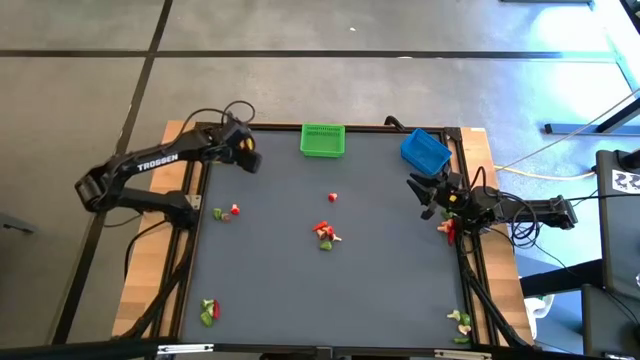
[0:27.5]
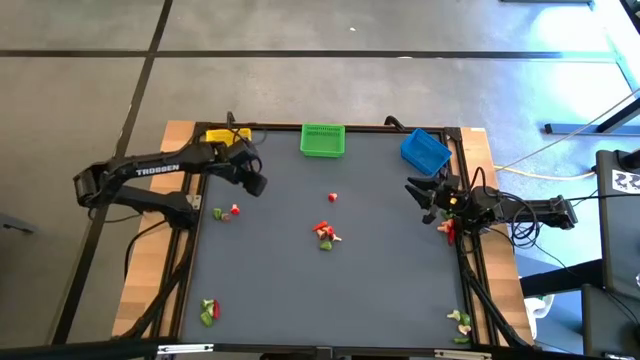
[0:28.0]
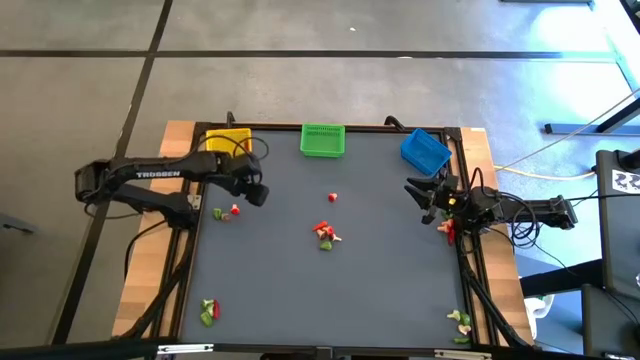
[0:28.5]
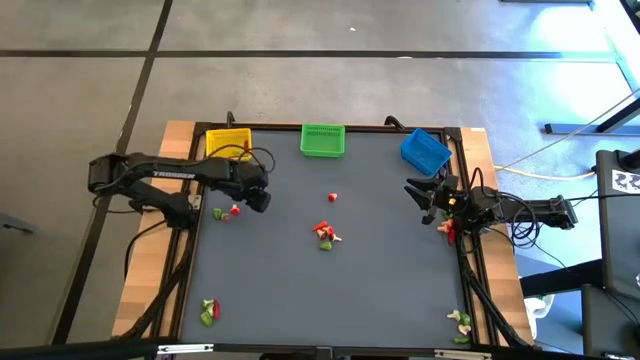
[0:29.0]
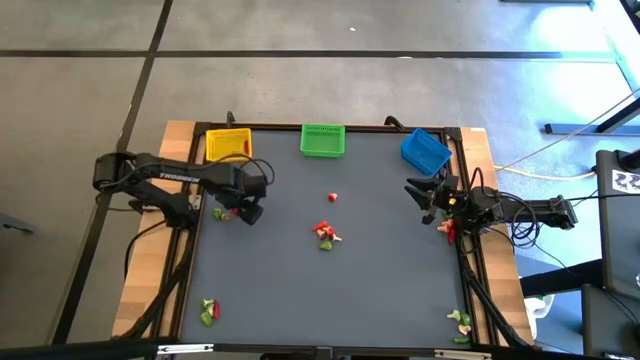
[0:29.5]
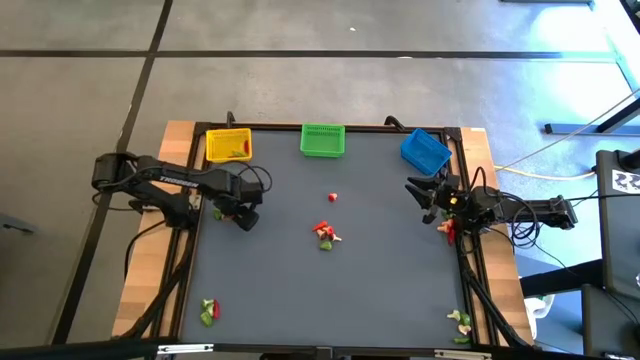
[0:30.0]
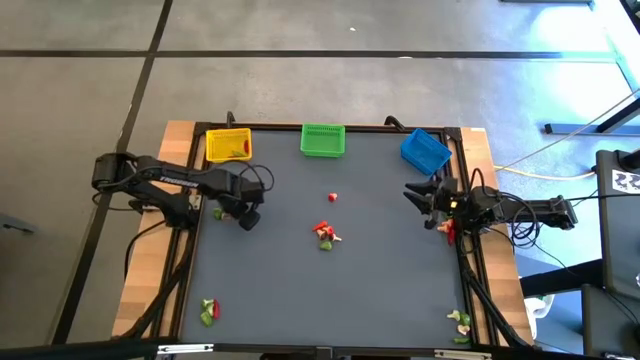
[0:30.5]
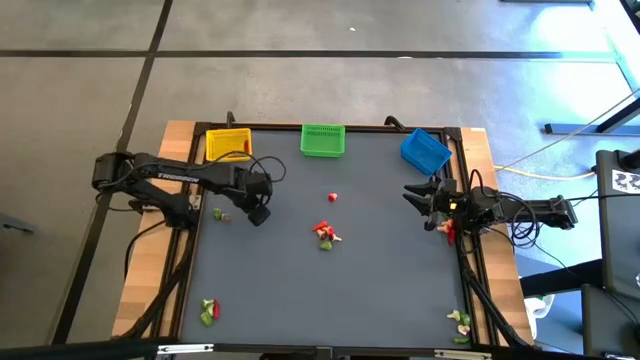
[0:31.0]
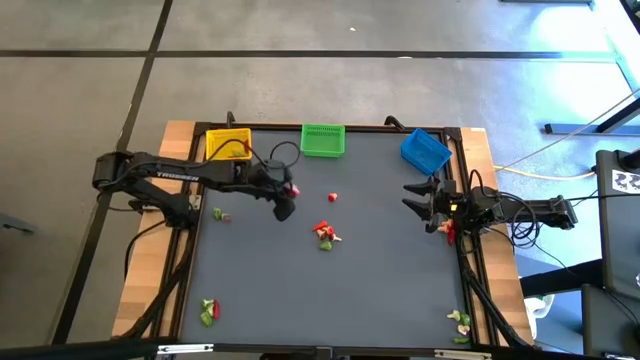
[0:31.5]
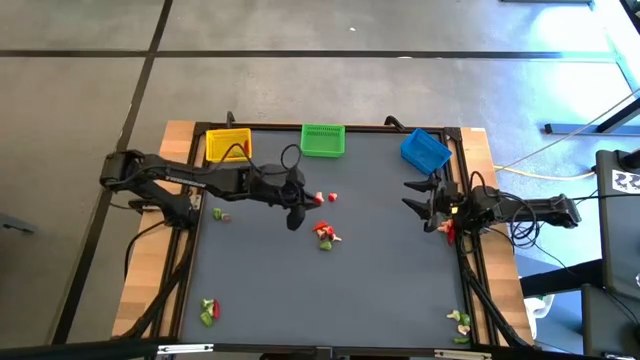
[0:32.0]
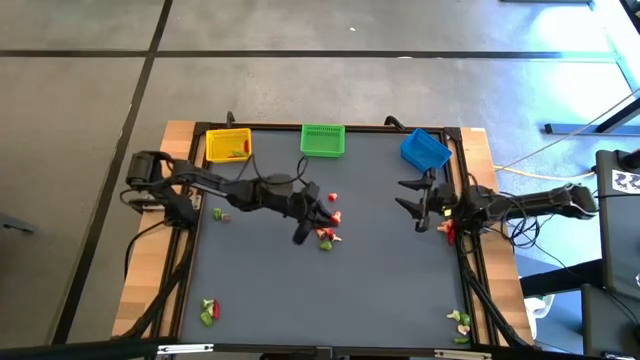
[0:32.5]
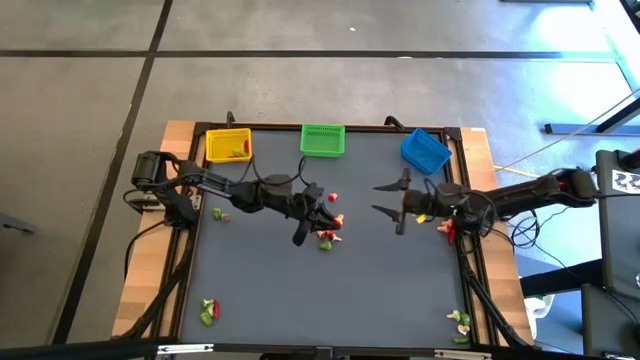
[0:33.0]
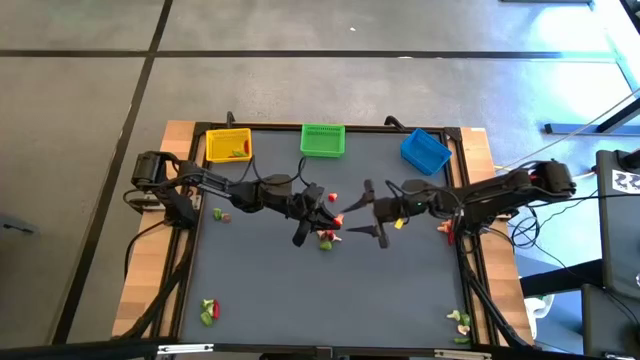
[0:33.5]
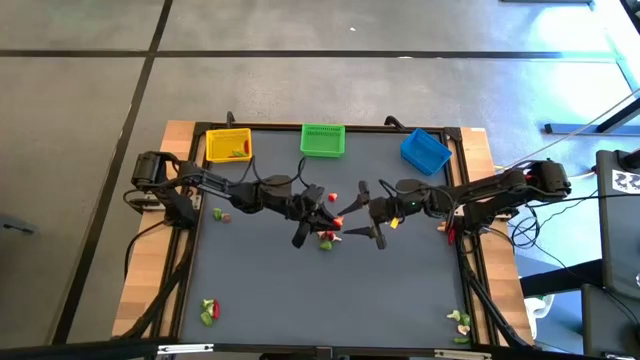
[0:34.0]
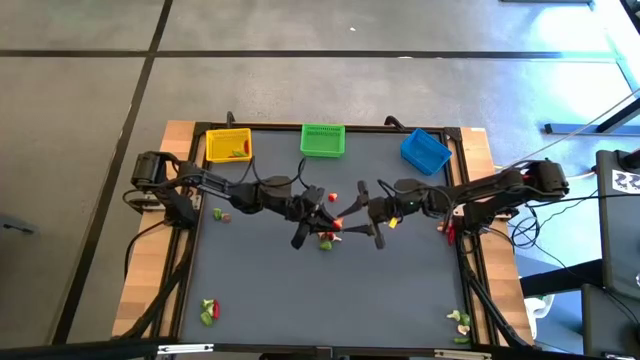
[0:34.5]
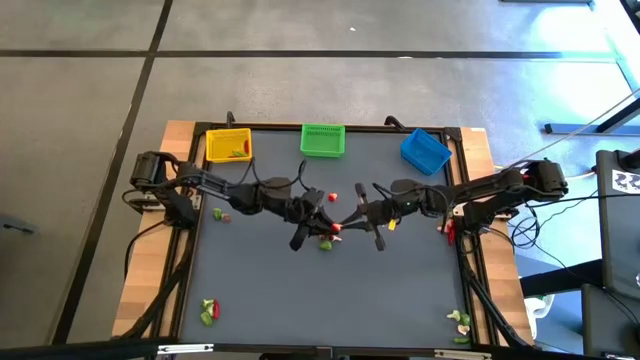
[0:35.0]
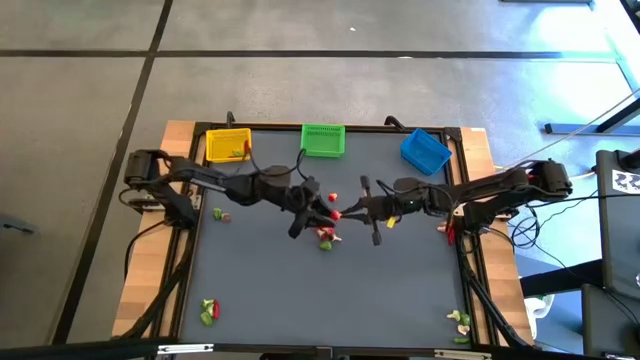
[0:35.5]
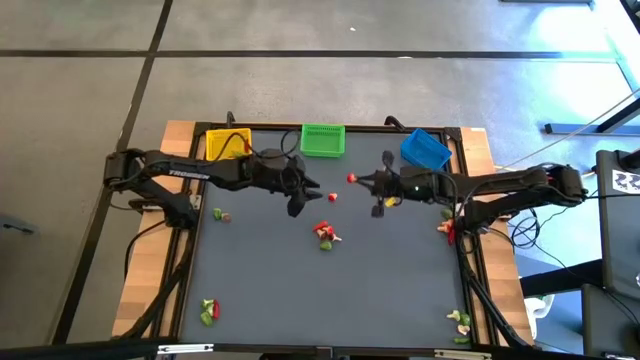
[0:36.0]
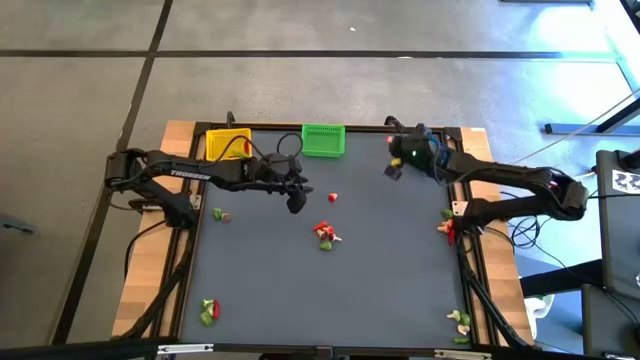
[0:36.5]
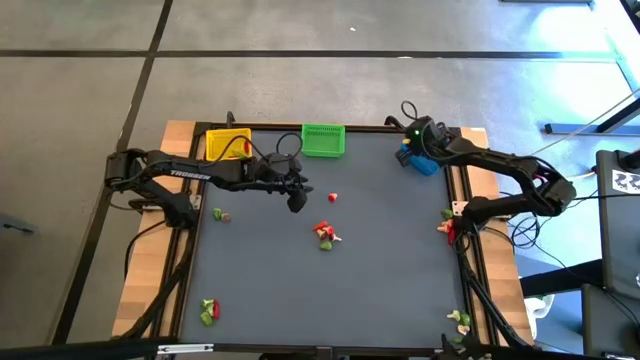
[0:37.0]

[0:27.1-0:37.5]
Task: Sort produce into baskets
Put the red mushroom into the blue basket

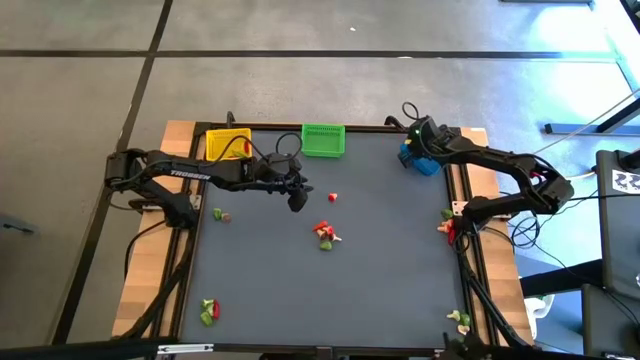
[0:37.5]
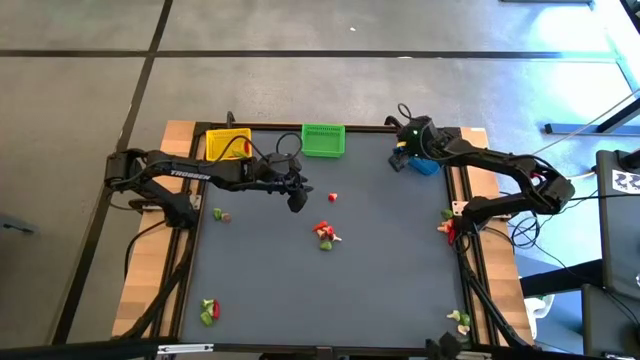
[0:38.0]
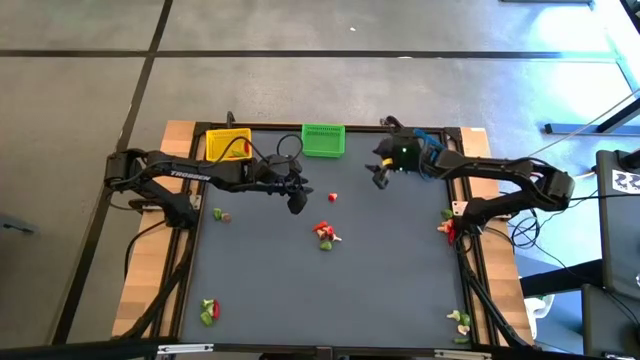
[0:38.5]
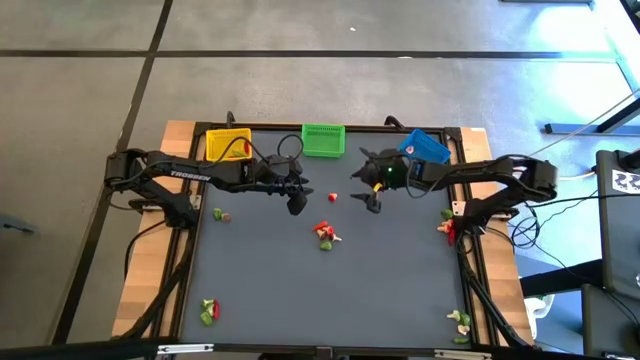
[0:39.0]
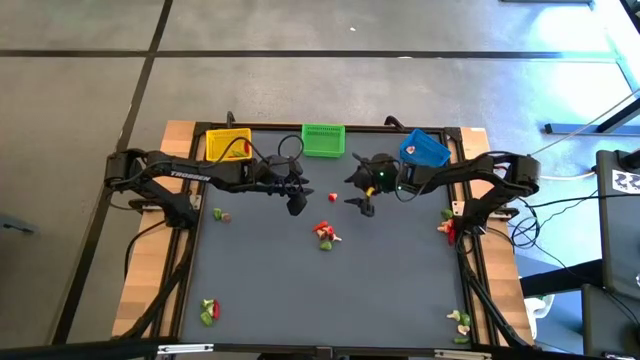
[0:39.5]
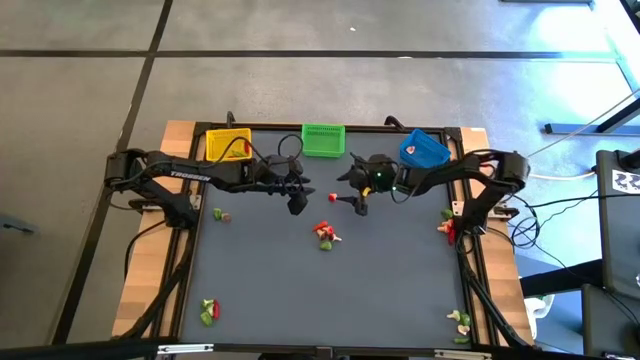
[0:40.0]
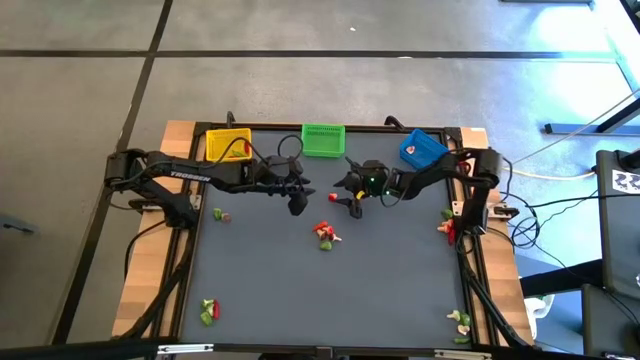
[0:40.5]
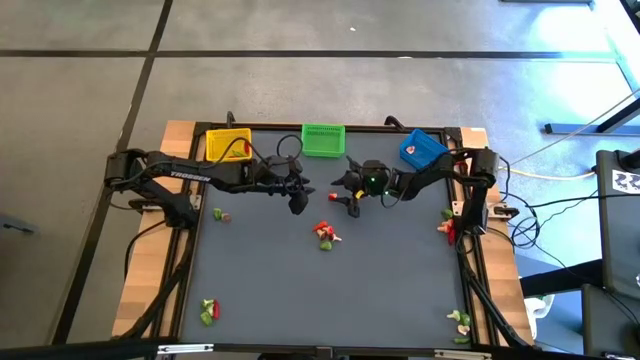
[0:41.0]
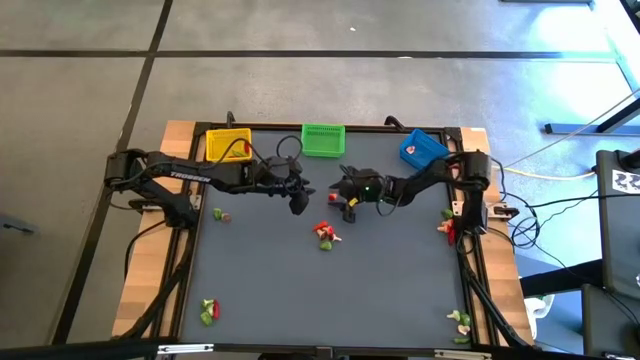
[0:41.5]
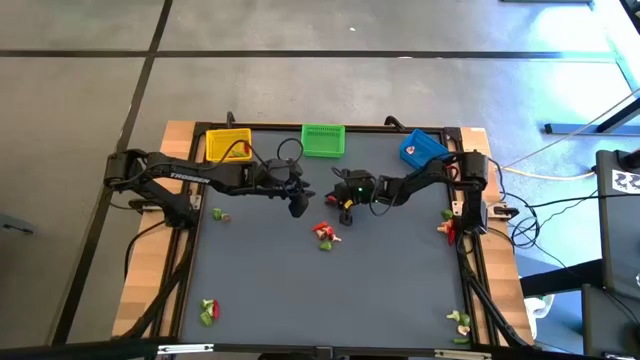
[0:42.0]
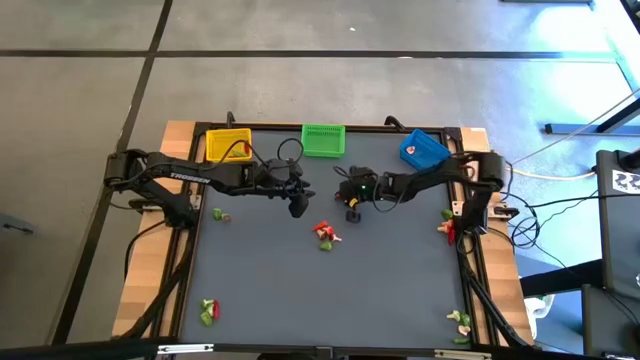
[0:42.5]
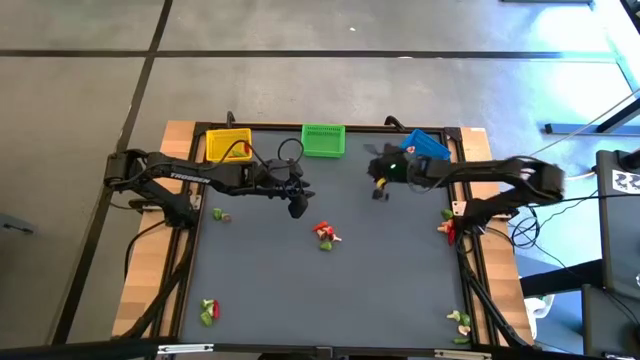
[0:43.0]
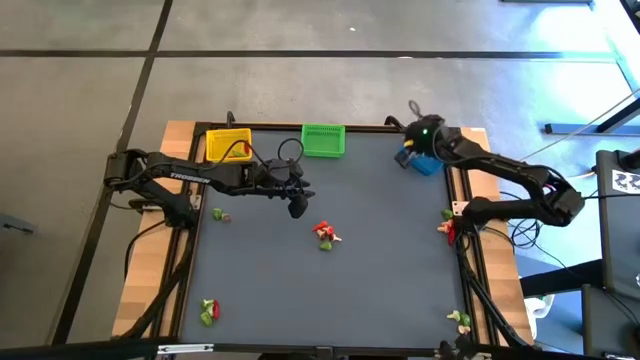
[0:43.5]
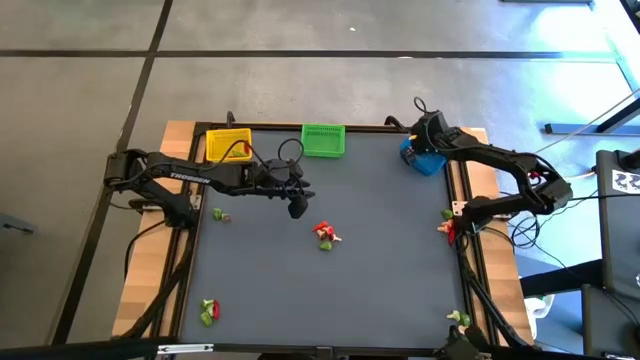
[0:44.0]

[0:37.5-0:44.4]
Put the red mushroom into the blue basket

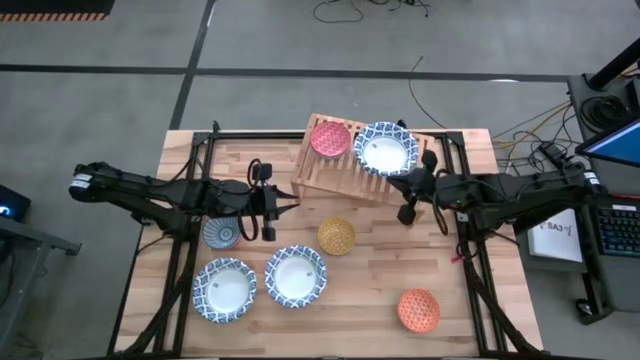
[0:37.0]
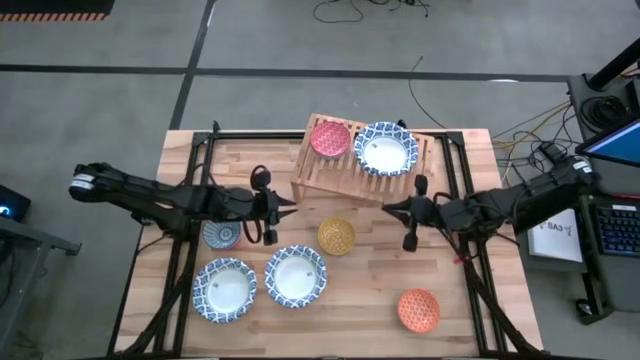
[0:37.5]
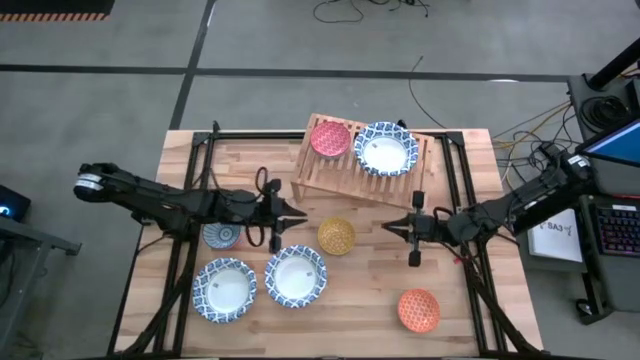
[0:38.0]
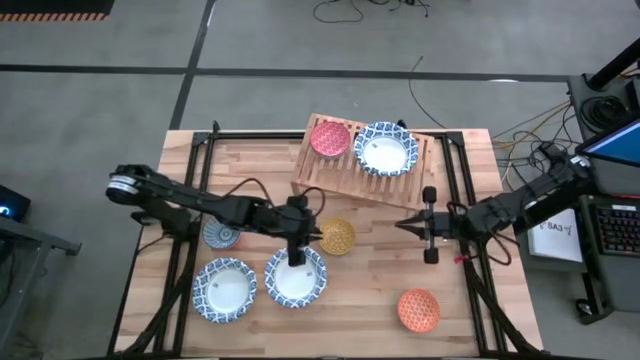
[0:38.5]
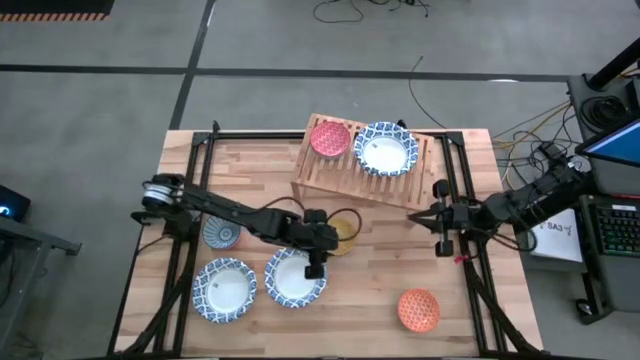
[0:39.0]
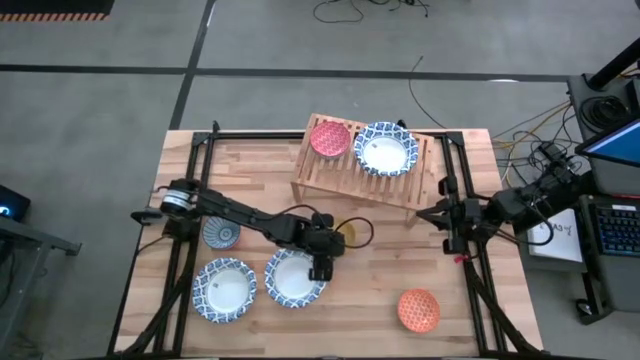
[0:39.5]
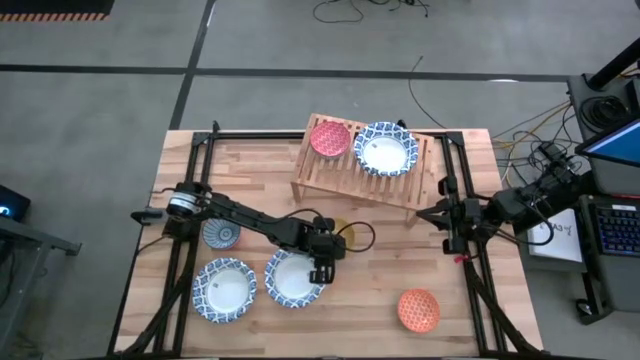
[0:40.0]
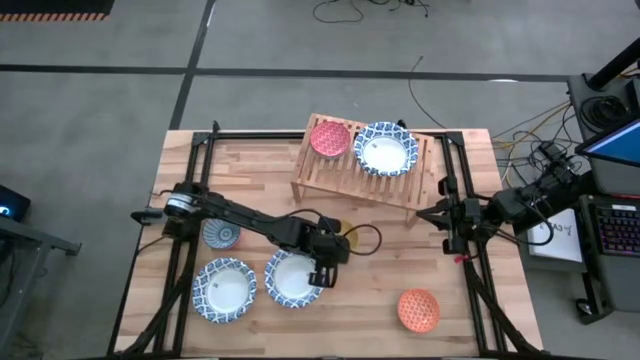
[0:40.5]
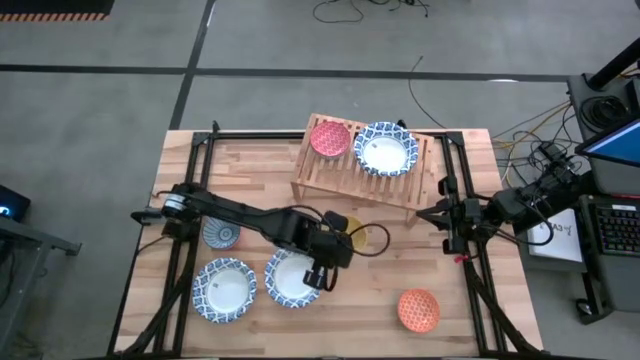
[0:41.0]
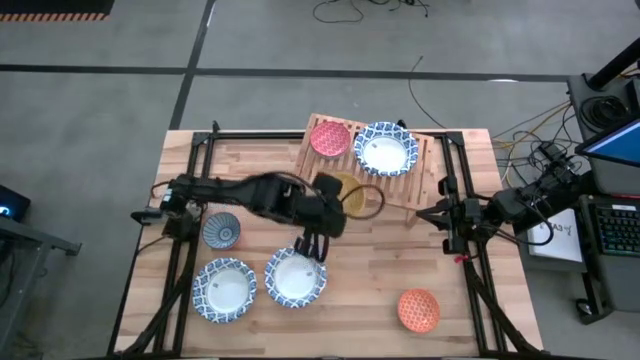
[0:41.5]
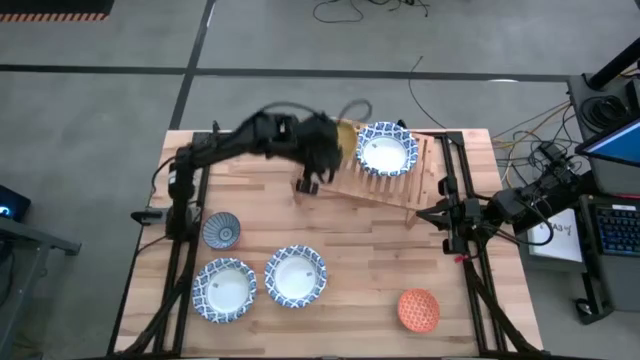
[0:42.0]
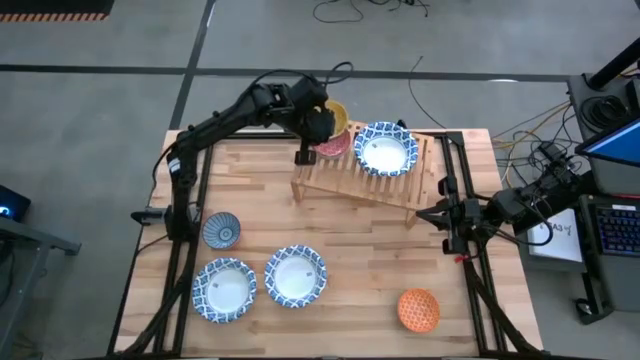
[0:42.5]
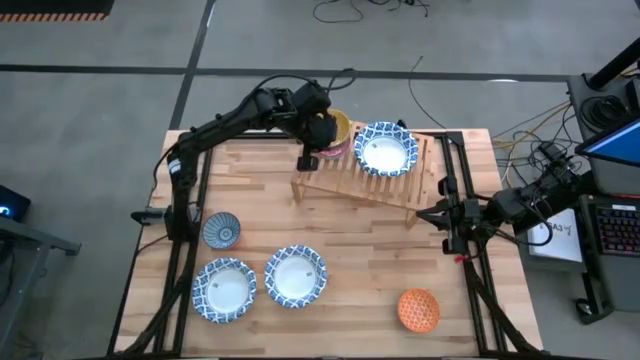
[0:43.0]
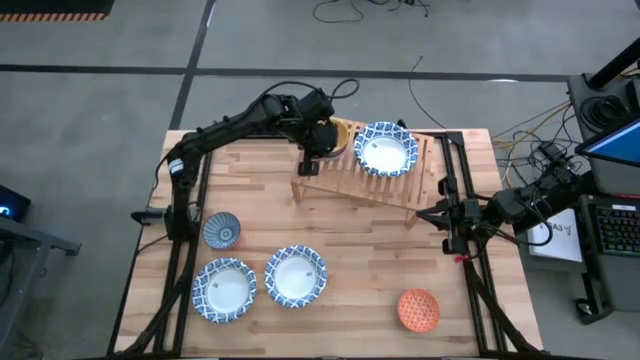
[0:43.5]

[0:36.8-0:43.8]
Task: Place and stack bowls onto a shelf
Stack the yellow pattern bowl on top of the red pattern bowl
